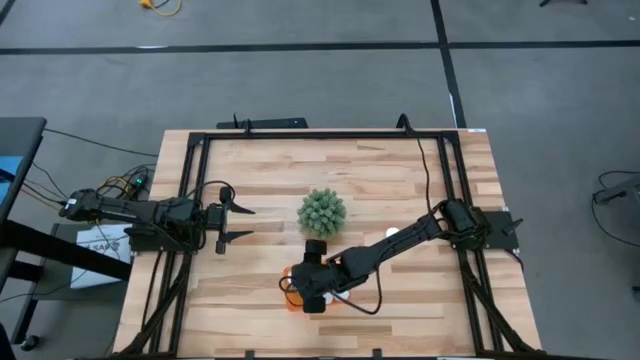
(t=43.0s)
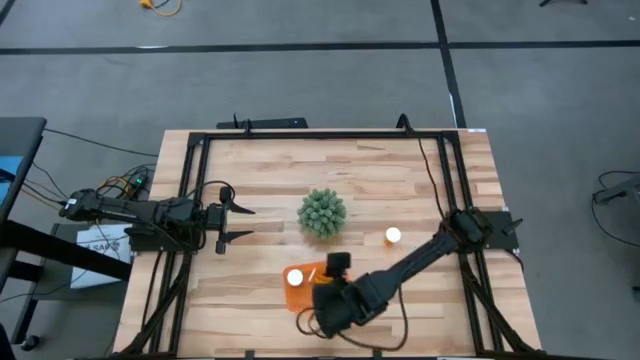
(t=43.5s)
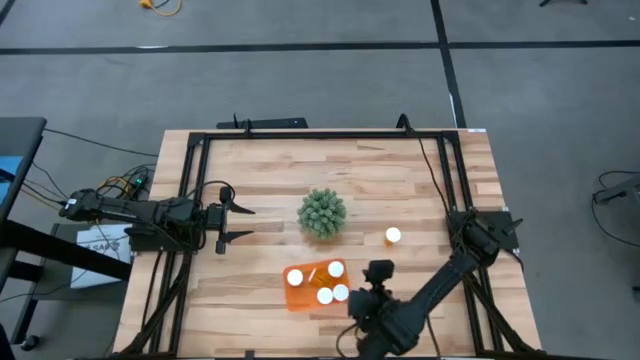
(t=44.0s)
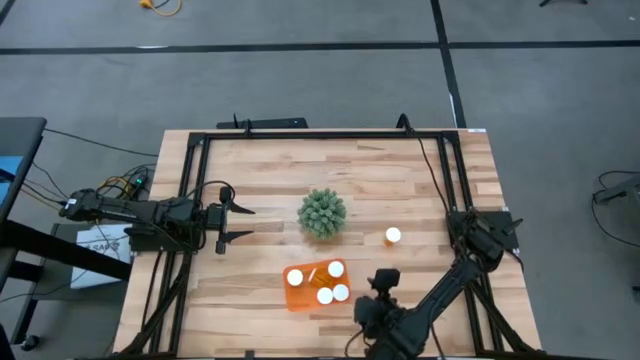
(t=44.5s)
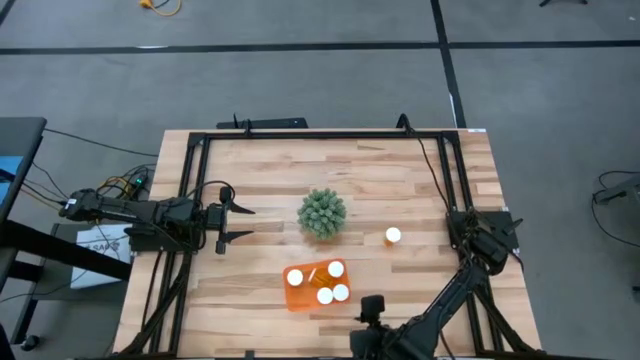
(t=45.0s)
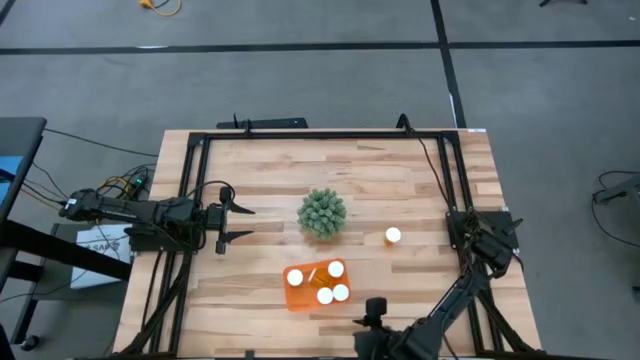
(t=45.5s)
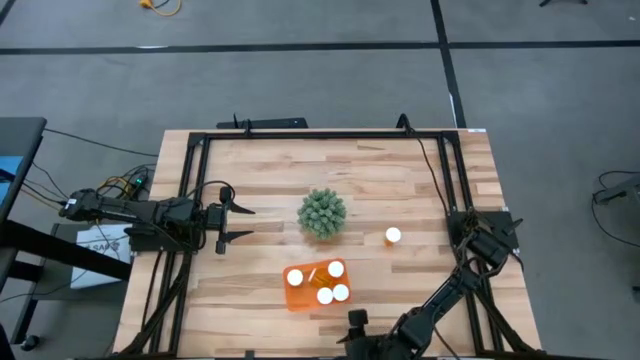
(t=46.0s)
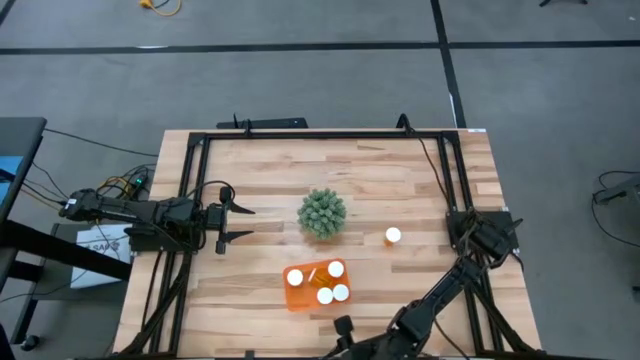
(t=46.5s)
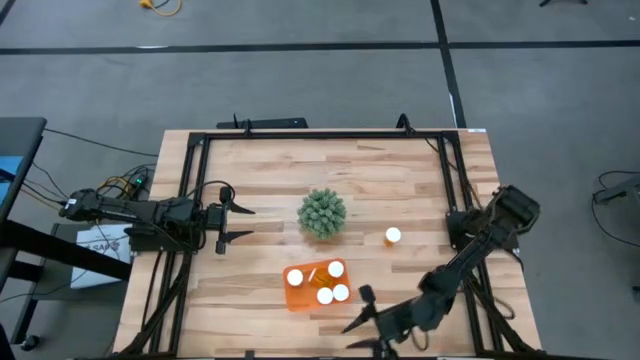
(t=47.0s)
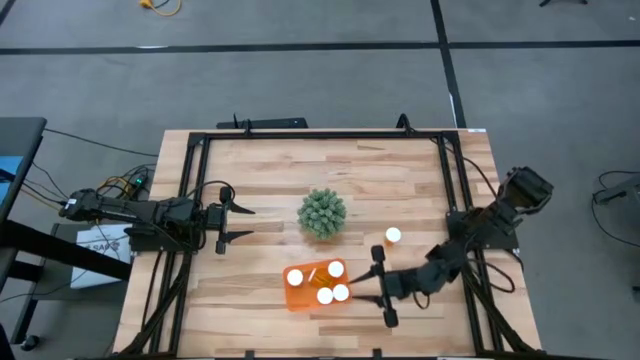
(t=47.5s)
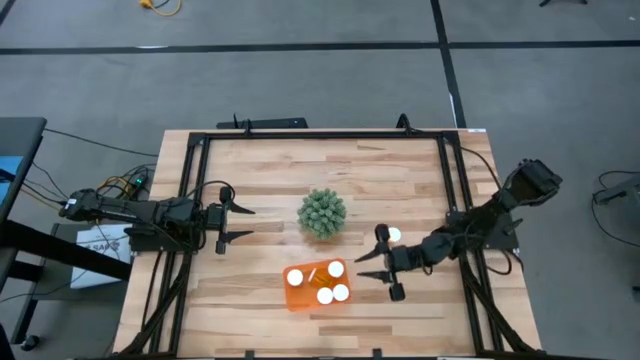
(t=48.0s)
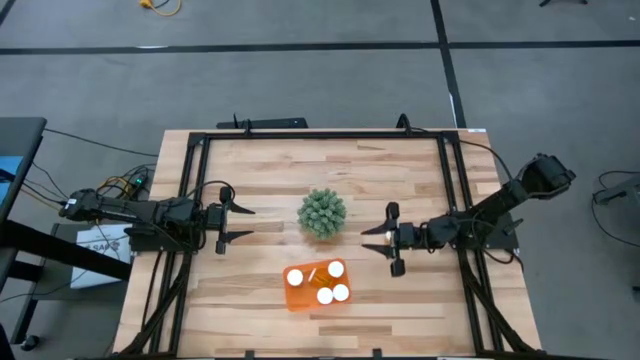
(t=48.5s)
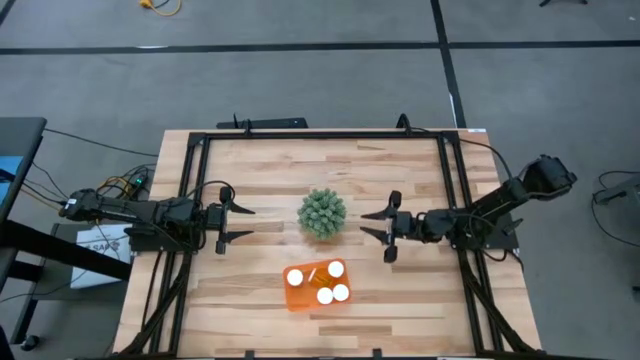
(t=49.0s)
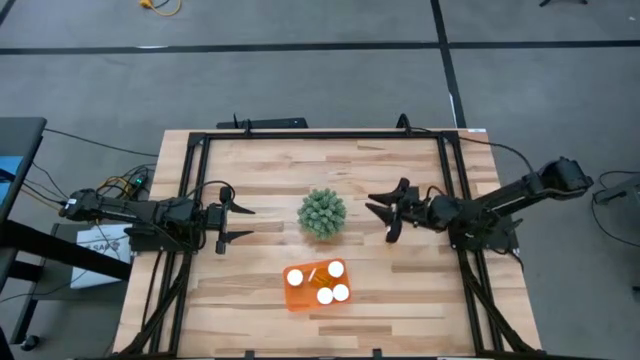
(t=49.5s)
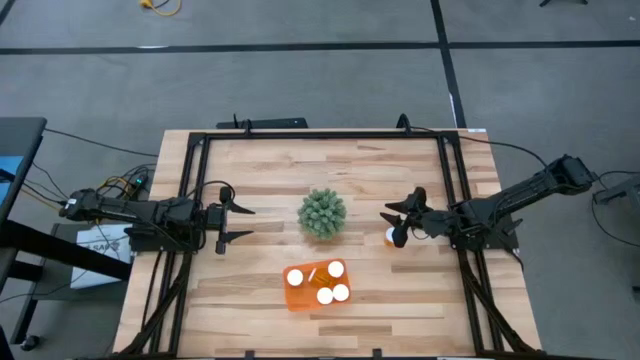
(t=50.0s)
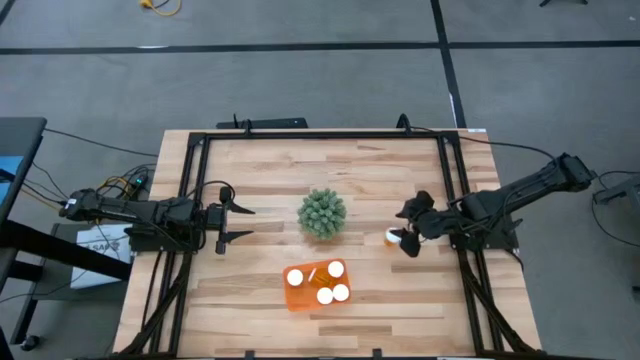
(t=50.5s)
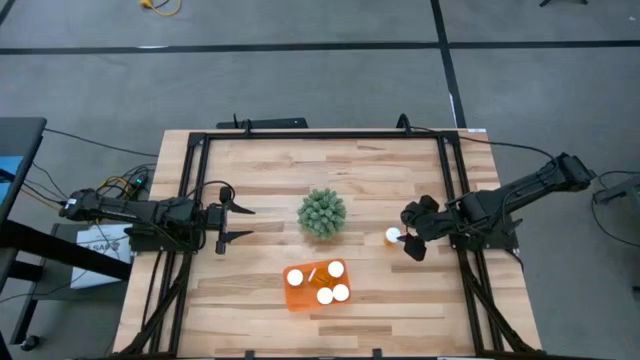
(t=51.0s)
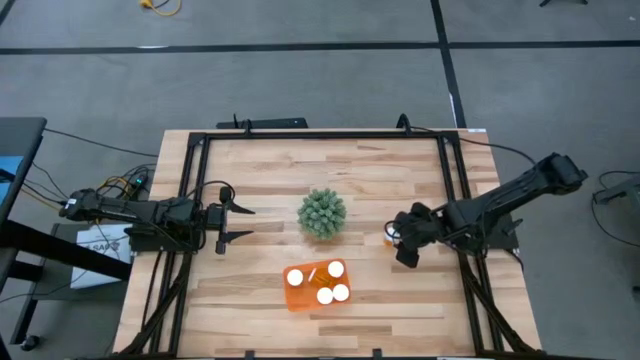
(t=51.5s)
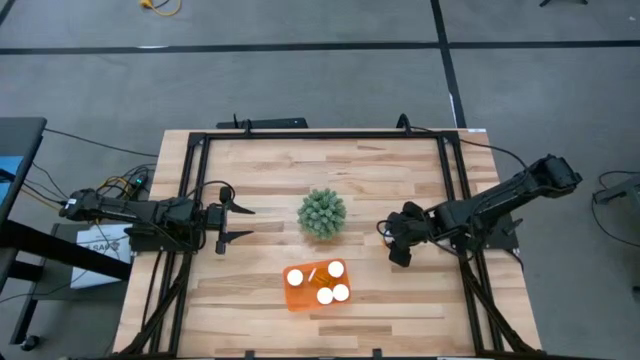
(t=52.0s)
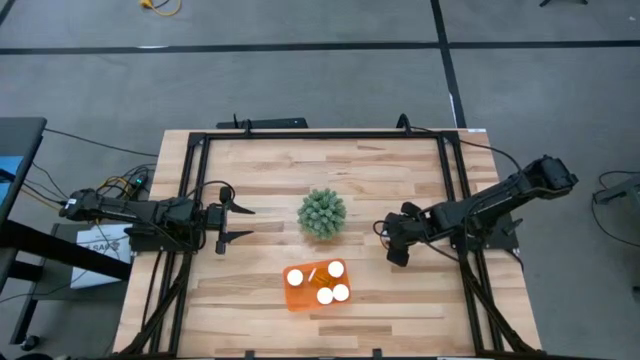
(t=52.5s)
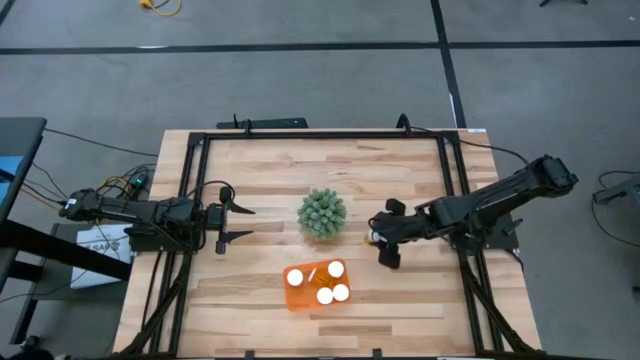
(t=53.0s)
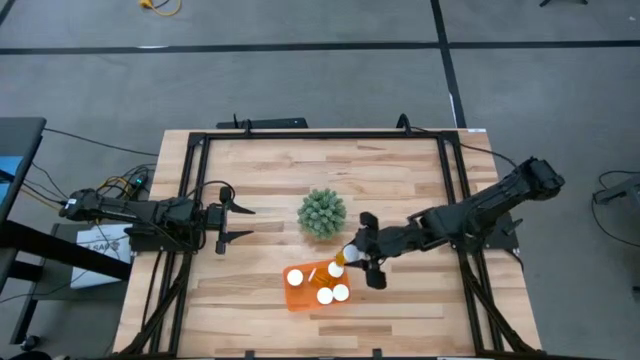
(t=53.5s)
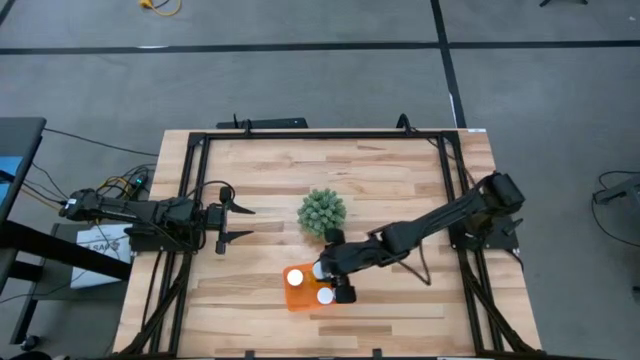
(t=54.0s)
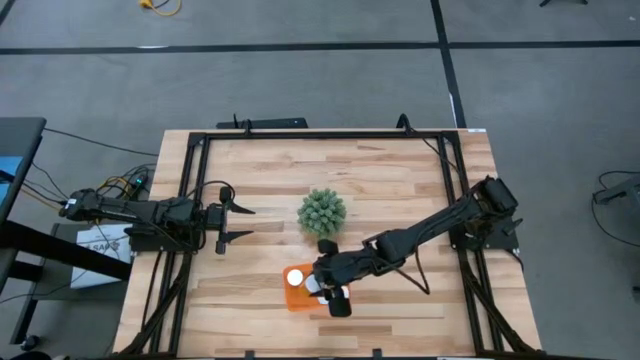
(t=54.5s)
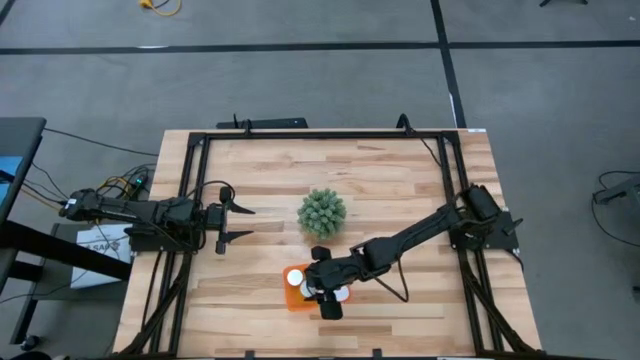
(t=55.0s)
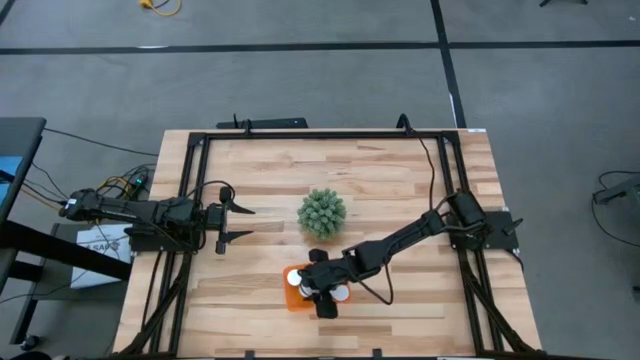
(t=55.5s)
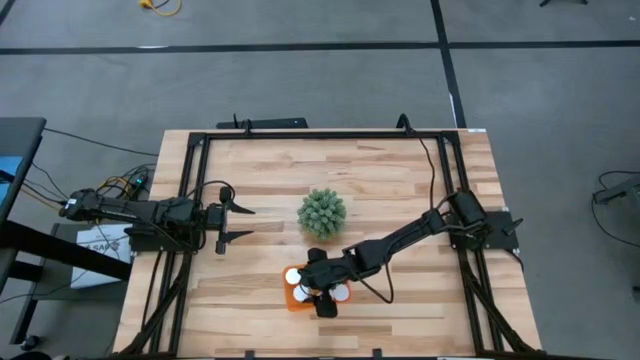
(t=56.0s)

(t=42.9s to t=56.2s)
Task: Pick and place pill bottles into a basket
Put the orange pill bottle into the orange bin

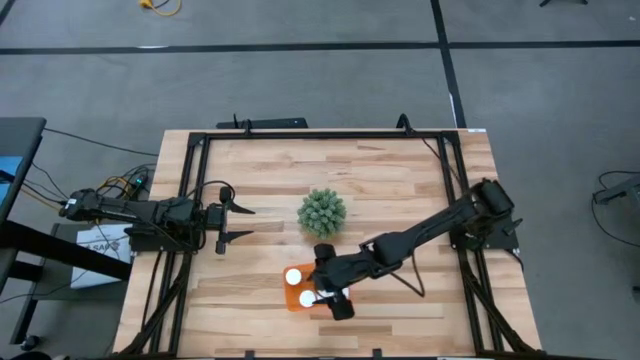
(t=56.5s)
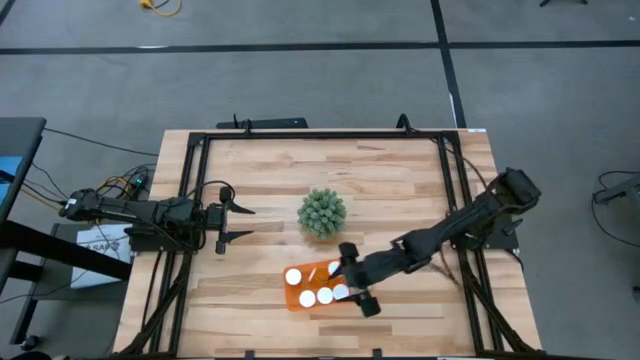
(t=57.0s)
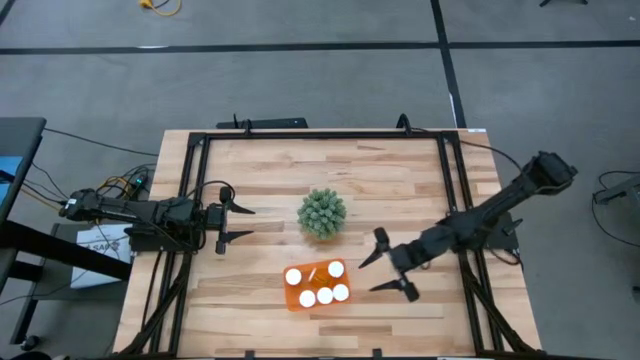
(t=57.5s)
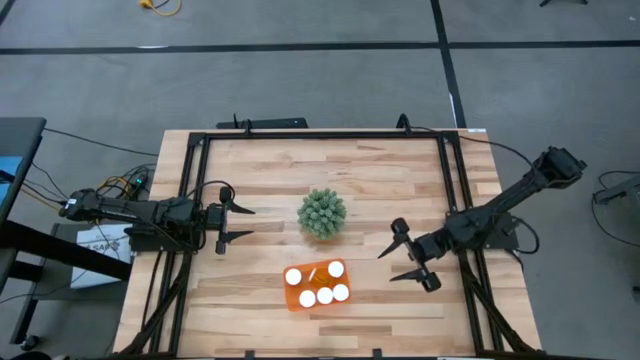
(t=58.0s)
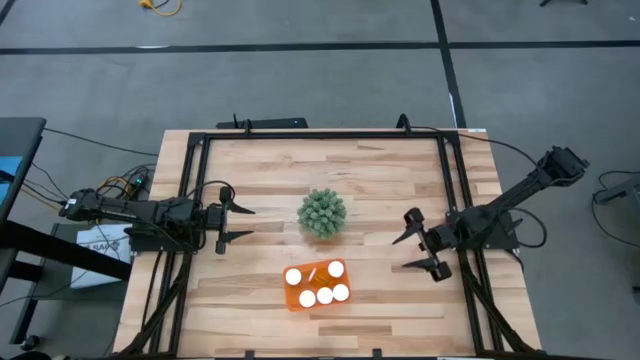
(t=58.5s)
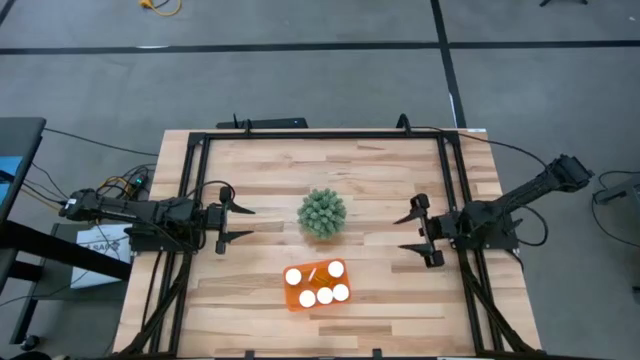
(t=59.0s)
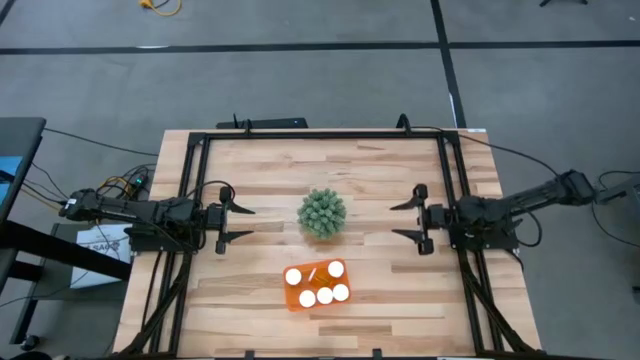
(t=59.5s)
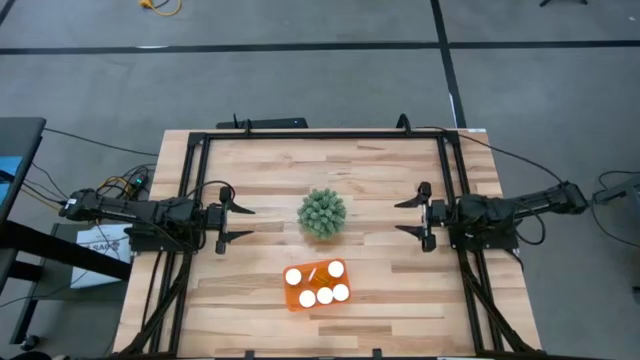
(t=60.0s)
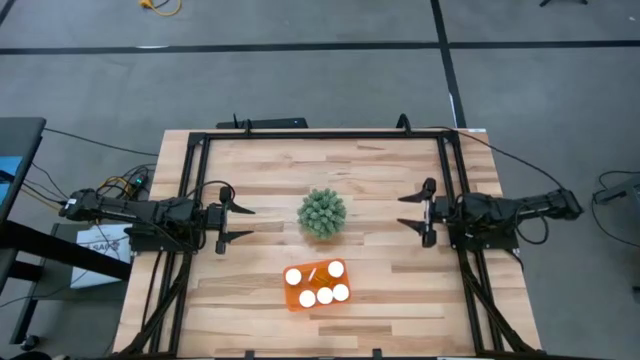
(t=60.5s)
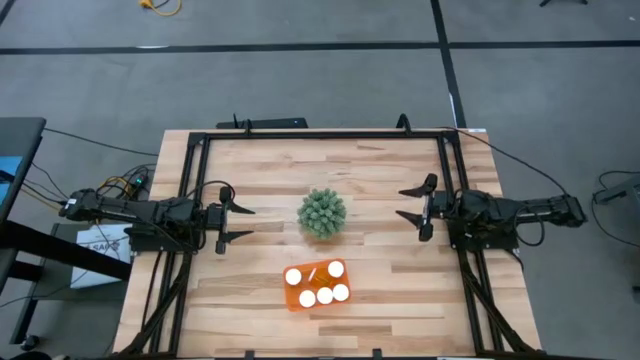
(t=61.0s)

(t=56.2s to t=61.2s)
Return to Home Position

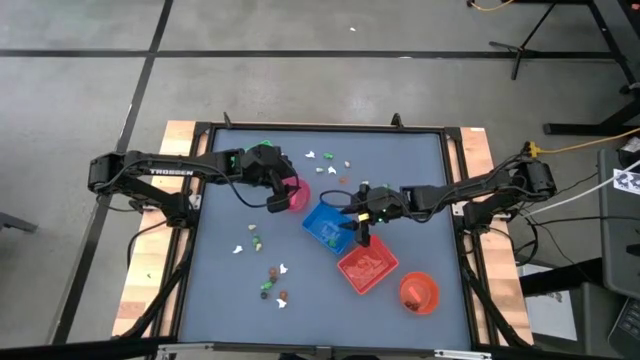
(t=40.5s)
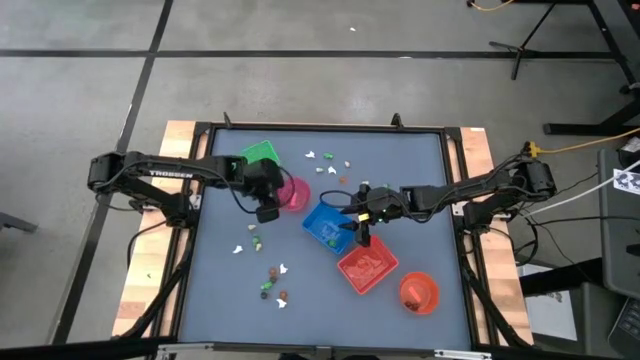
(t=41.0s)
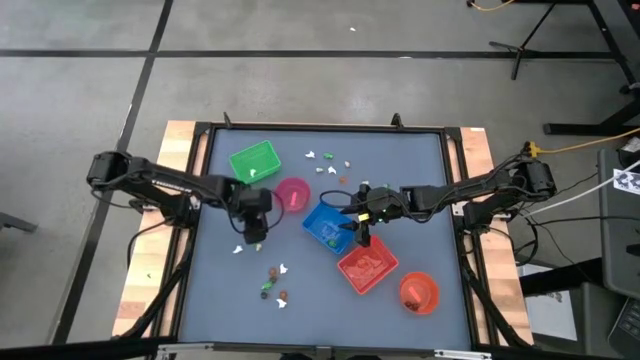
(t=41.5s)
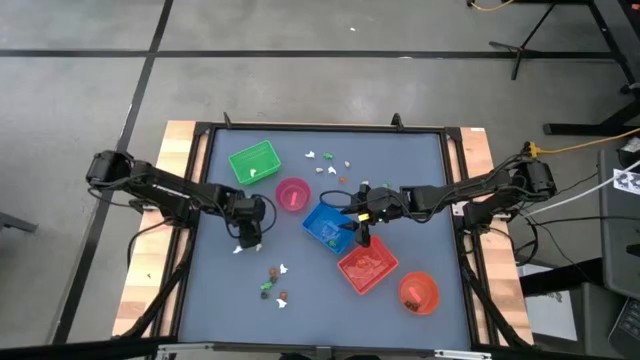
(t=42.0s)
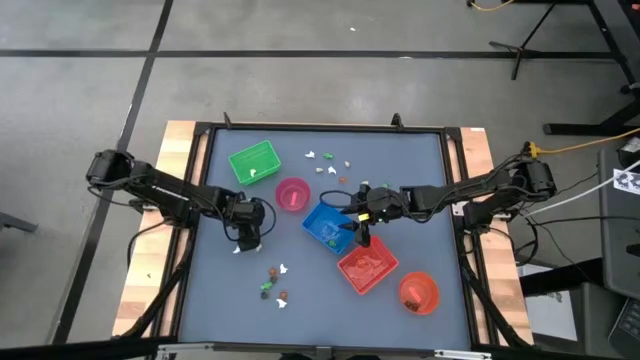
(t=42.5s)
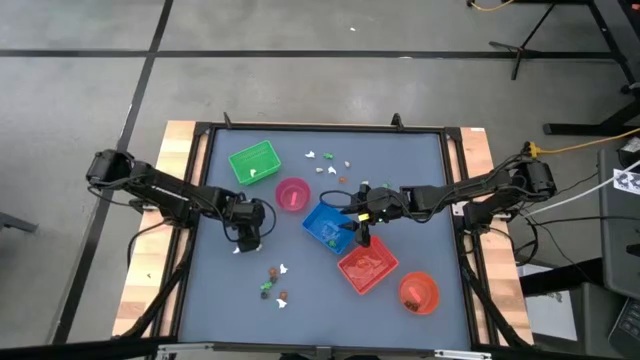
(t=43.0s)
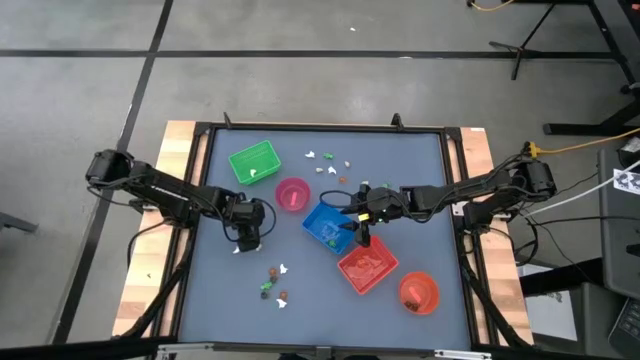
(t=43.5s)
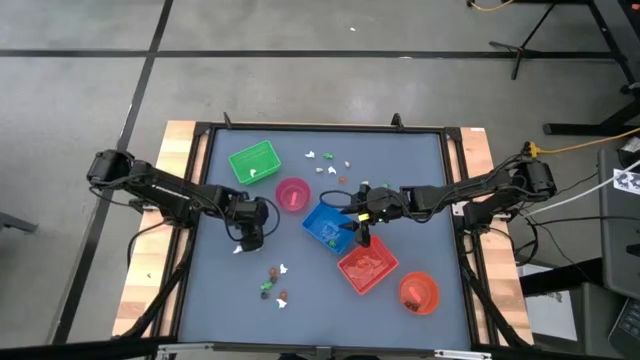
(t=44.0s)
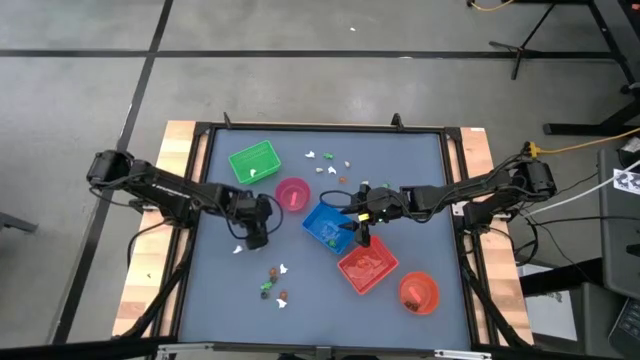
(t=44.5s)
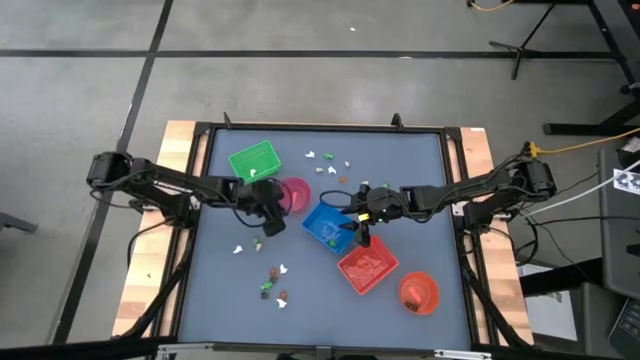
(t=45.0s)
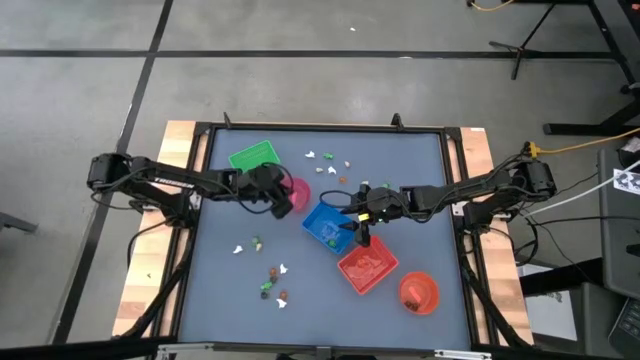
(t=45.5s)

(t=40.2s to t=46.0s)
Task: Sort Halloween decoration
Put the light brown skull toy into the light red bin
